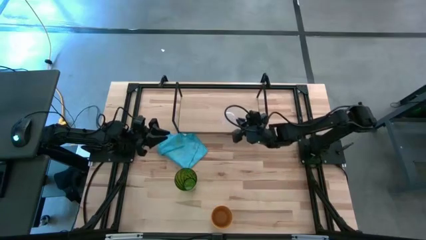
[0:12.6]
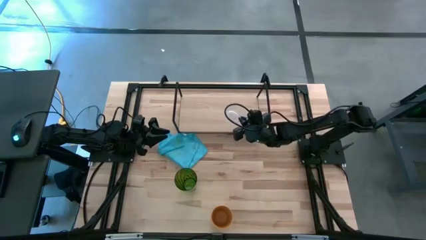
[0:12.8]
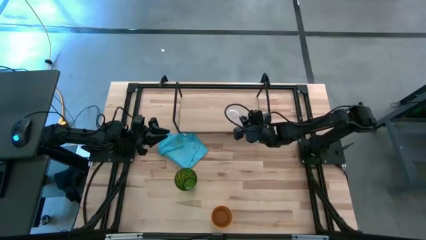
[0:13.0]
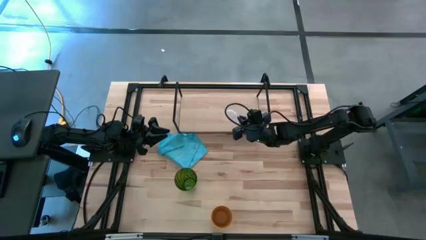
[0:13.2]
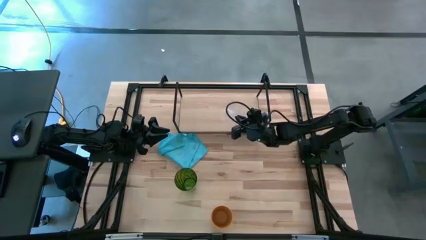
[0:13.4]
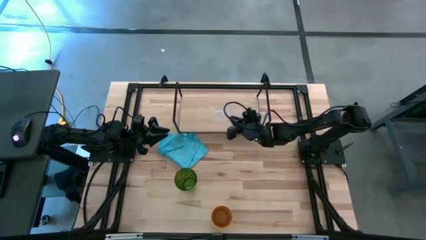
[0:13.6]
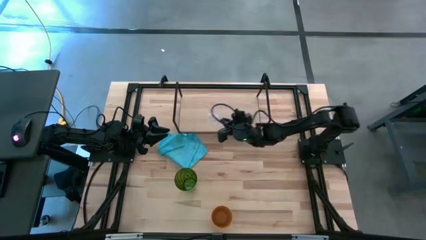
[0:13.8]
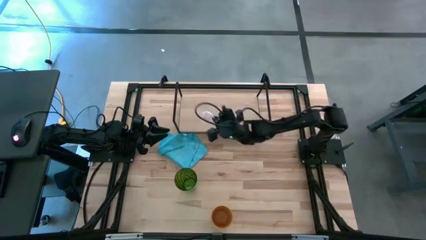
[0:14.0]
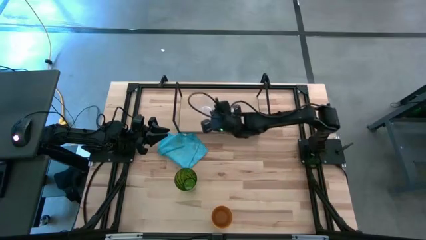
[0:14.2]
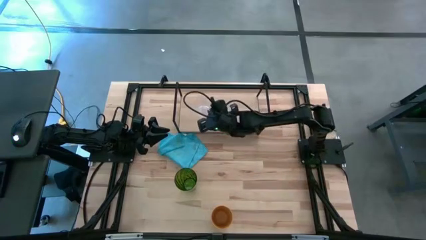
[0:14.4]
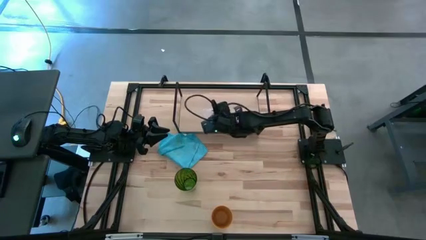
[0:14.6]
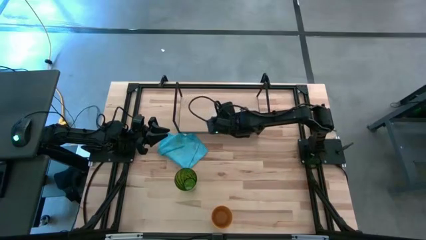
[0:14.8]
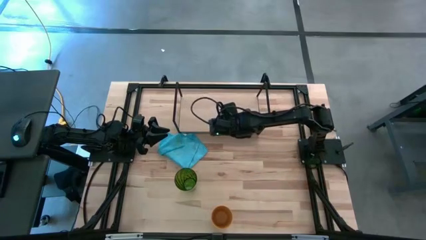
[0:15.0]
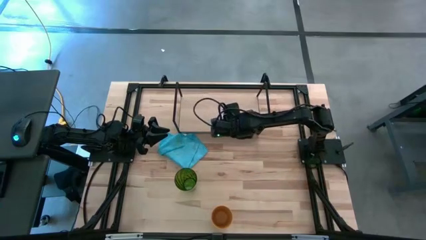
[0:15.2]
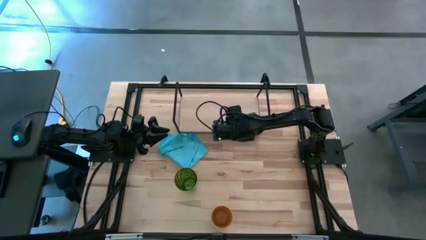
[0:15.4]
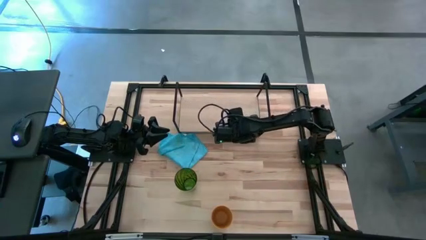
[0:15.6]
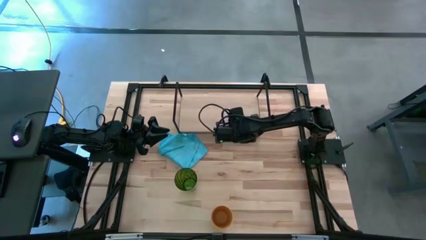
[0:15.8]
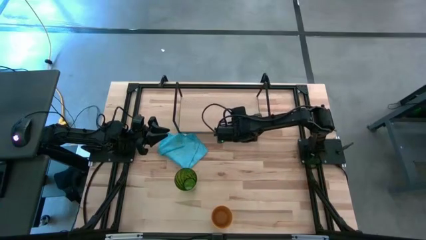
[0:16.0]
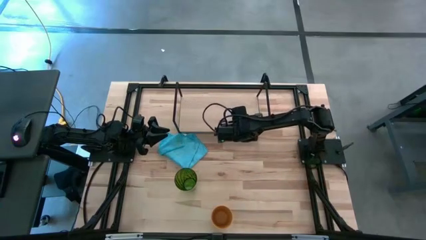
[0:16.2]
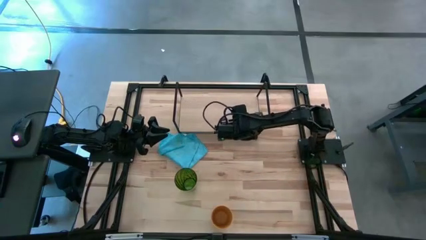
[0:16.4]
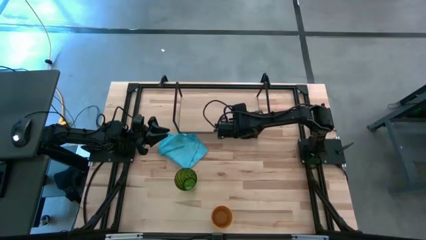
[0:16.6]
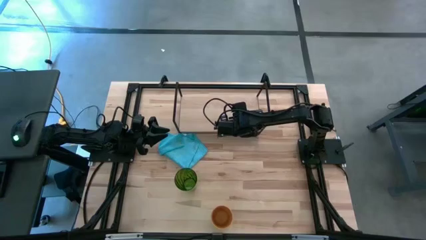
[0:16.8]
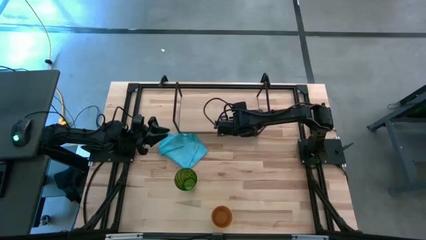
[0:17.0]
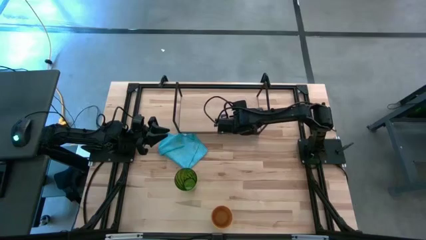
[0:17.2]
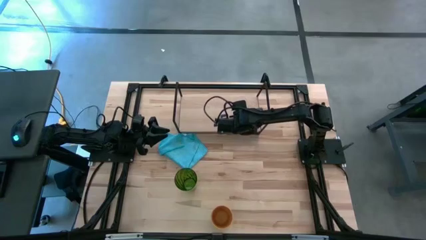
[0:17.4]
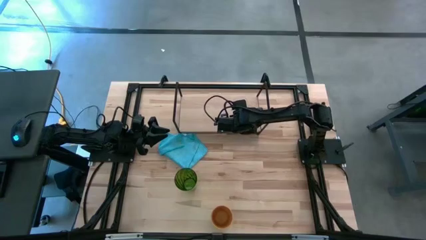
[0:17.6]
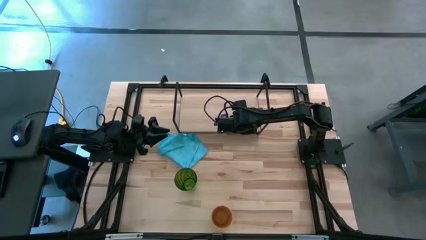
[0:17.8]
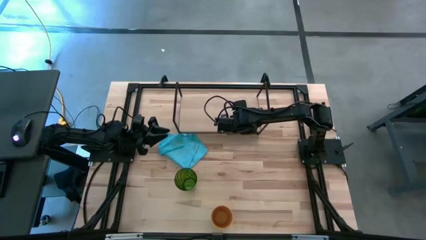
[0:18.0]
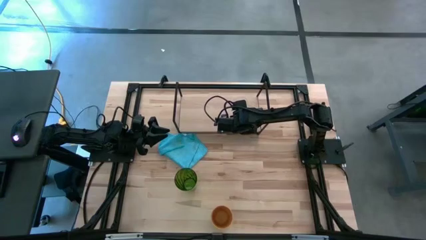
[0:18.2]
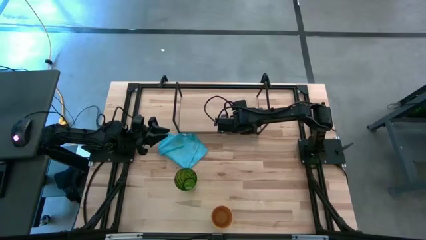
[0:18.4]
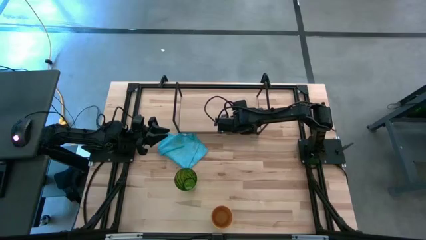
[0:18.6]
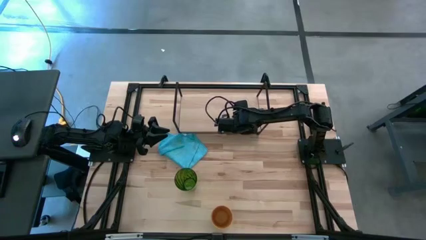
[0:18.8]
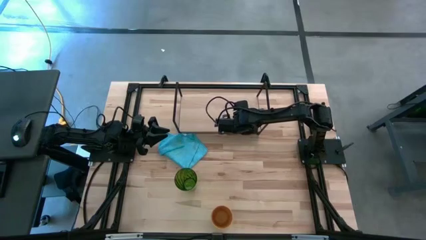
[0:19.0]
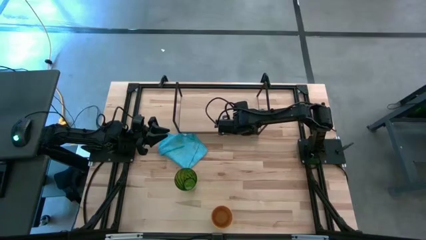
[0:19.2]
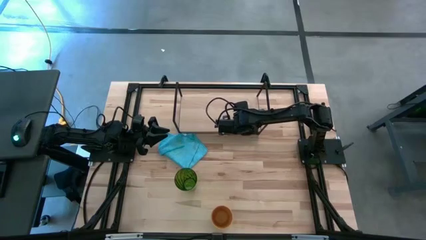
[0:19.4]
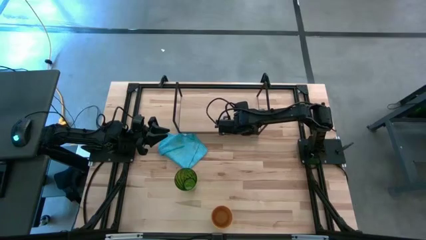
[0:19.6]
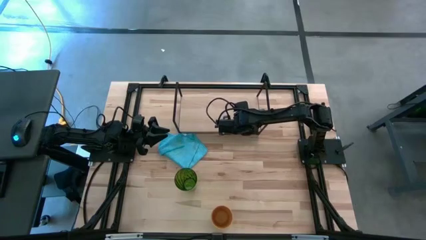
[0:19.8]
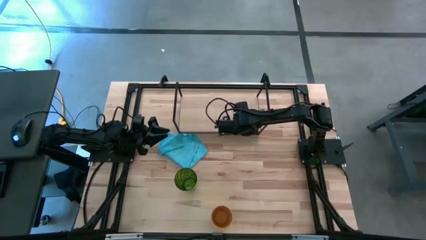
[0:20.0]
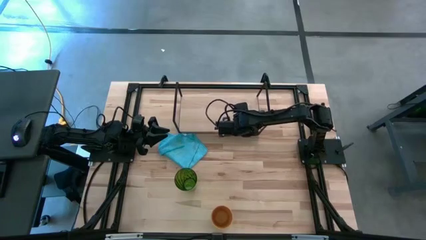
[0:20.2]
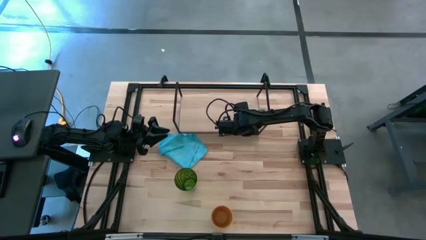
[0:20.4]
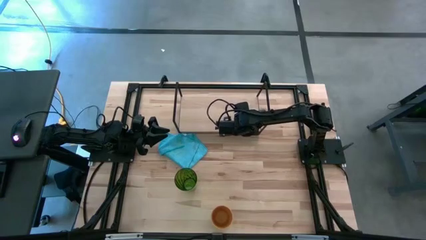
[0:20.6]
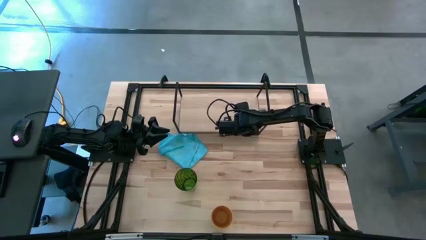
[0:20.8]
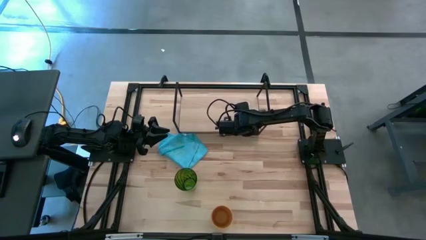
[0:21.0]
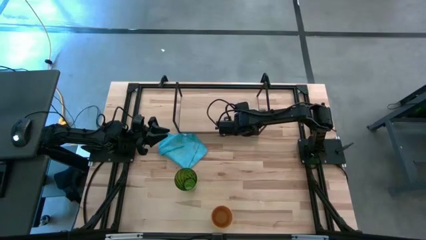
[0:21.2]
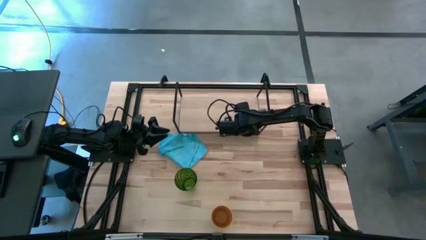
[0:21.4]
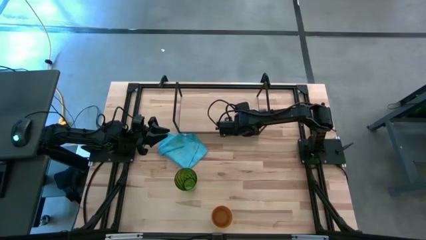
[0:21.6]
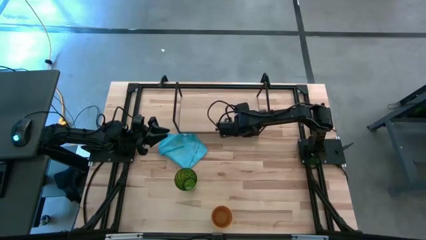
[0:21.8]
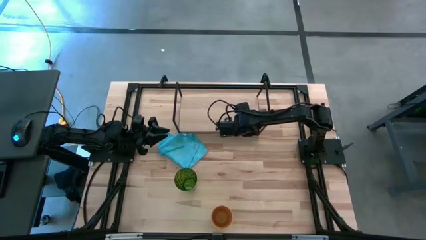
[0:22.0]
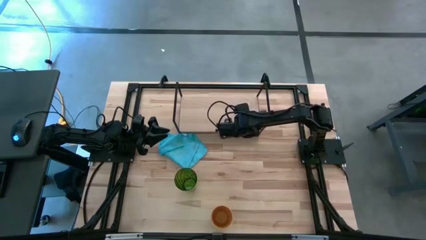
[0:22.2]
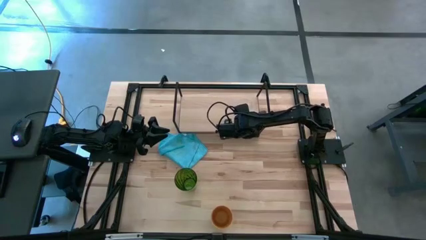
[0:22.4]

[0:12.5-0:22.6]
Task: Stack small to large cups/mugs on shelf
Put the transparent mug on the shelf

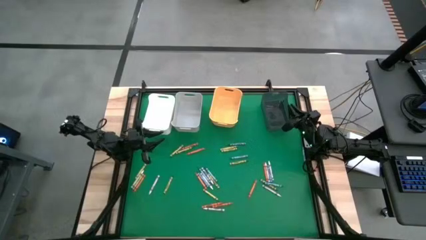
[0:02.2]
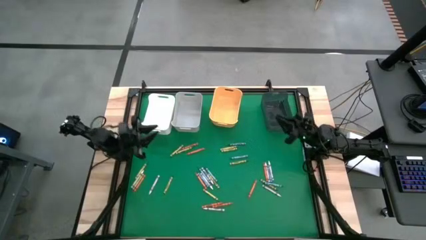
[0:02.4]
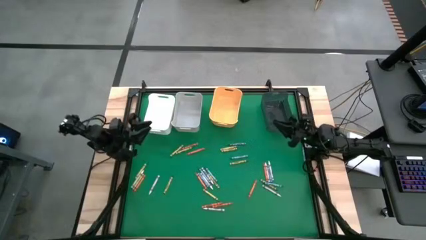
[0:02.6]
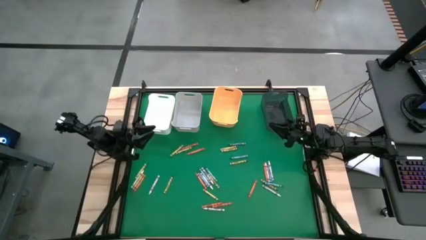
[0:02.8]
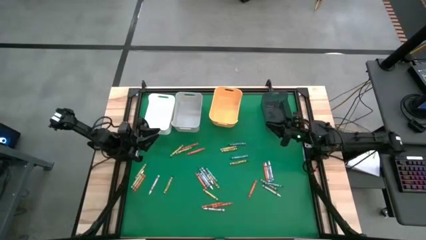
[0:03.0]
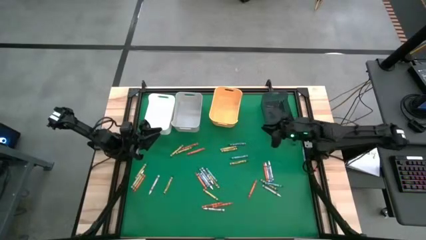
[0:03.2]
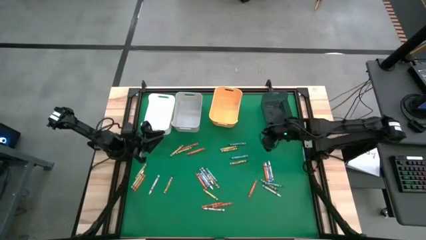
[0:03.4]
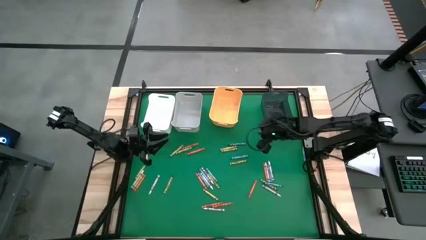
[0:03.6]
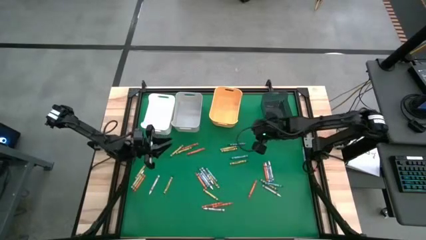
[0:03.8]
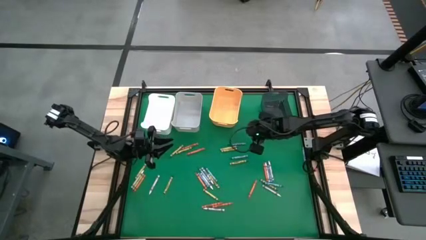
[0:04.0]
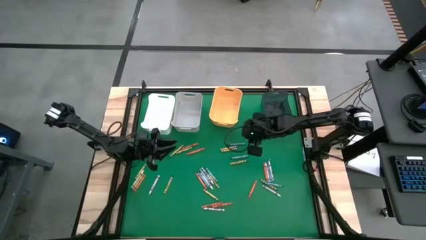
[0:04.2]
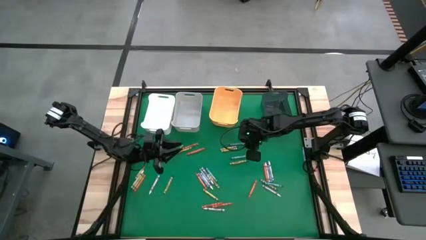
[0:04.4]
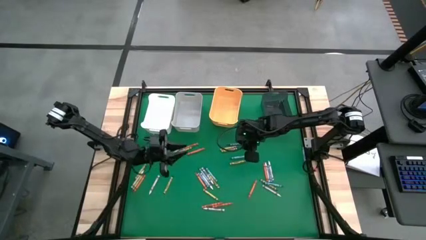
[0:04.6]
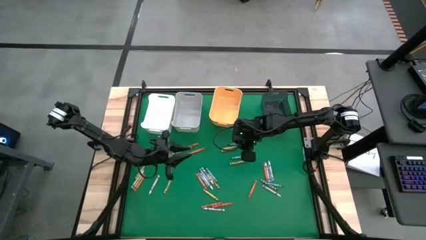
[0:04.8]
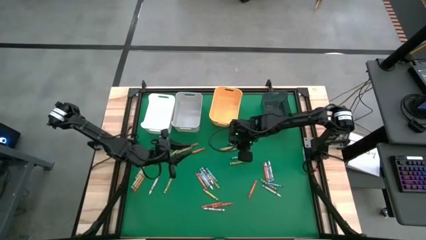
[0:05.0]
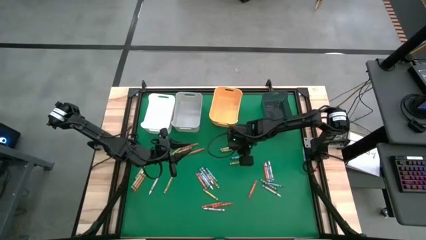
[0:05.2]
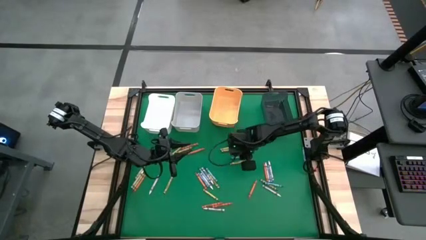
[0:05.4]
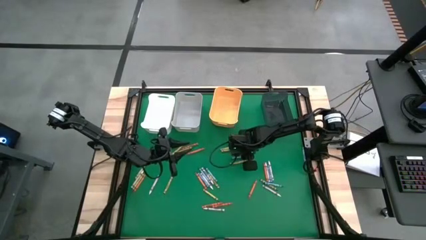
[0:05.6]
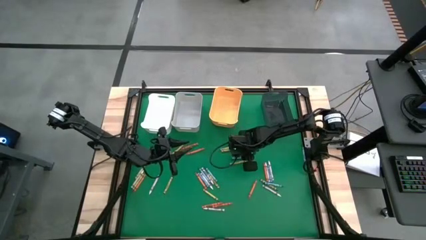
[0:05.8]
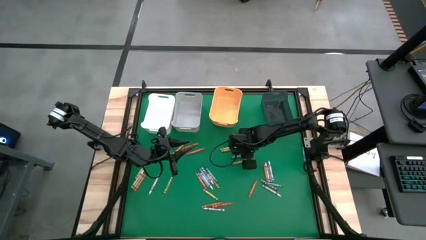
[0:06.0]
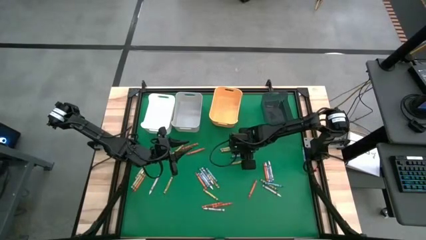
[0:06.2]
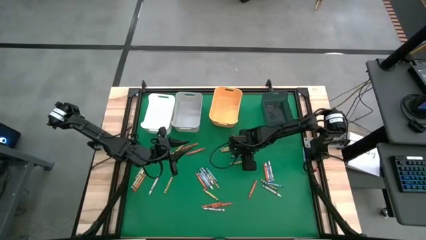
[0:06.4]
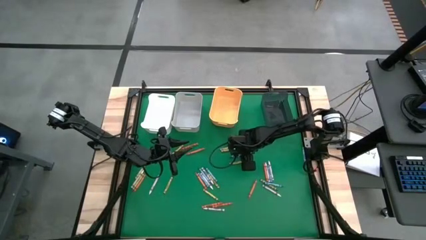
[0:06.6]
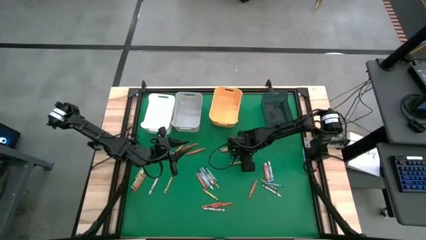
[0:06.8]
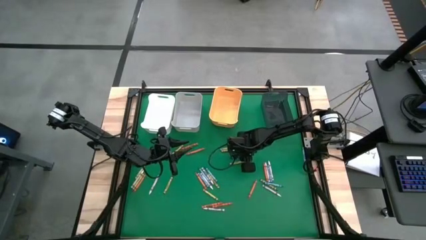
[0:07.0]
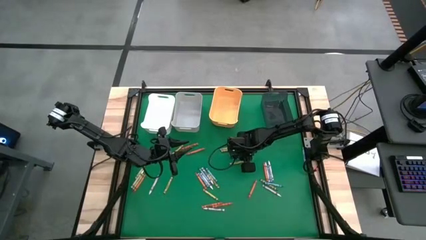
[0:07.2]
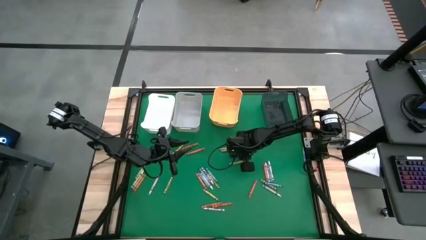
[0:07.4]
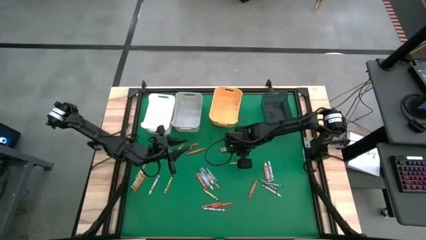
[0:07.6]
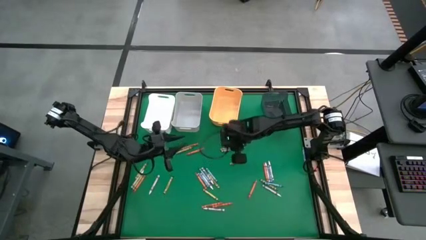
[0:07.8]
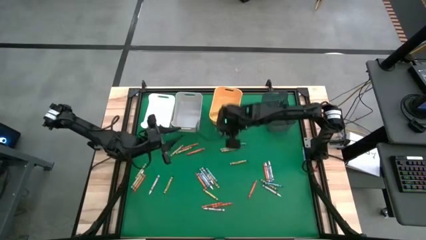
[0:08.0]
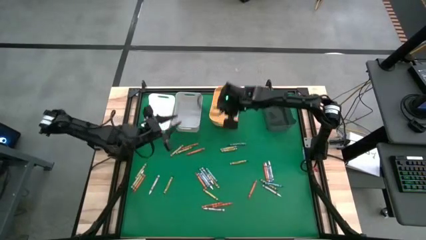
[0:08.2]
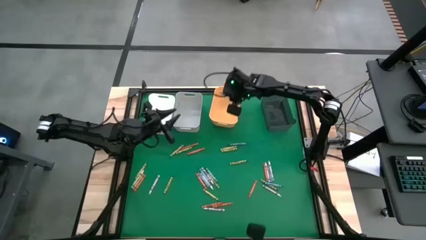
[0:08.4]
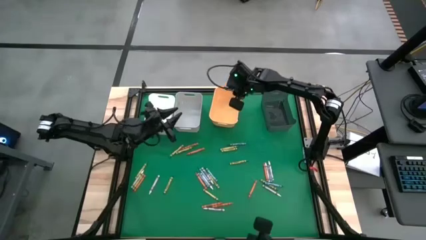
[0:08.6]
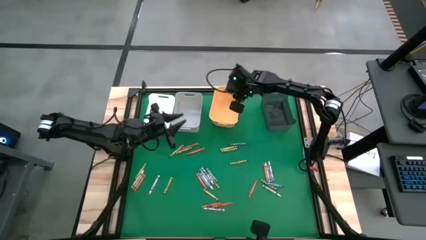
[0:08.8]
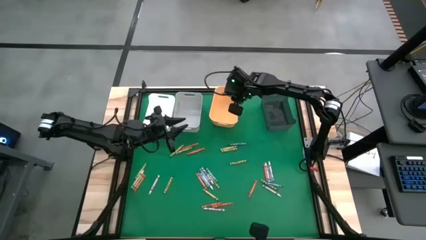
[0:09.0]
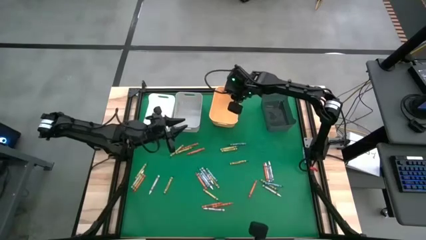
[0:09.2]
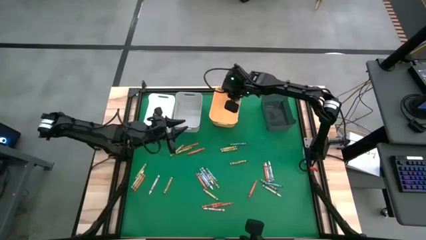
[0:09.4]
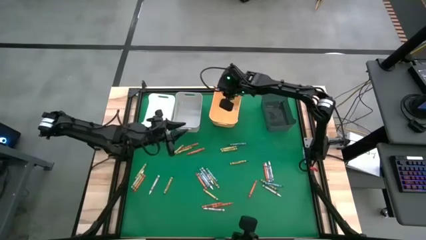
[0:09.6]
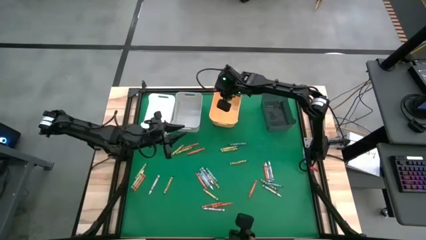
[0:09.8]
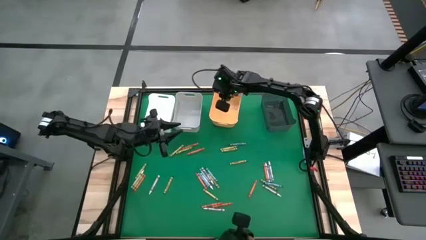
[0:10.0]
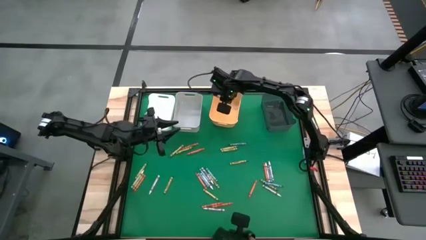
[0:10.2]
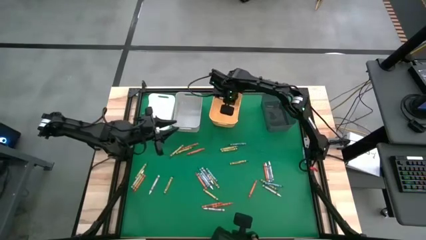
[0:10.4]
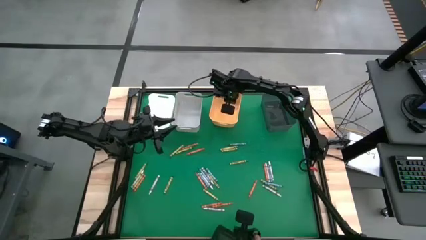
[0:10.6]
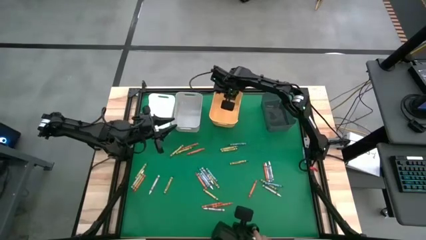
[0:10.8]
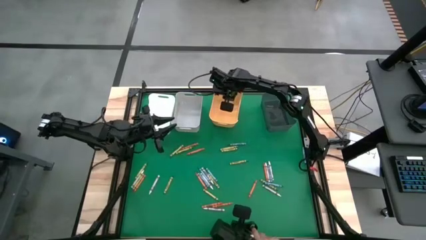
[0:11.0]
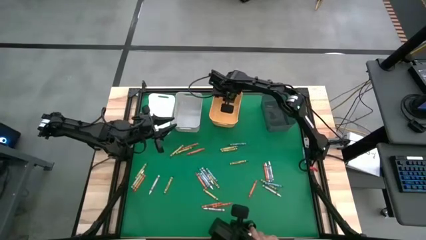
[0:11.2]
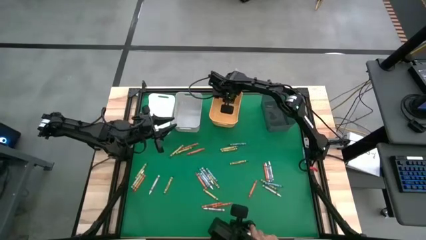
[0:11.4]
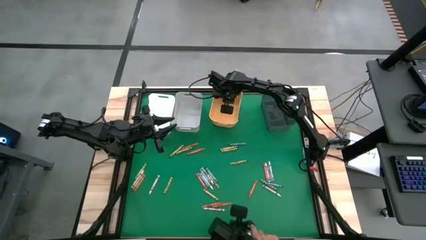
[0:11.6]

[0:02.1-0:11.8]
Task: Sort crayons
Put the blue crayon into the yellow bin
